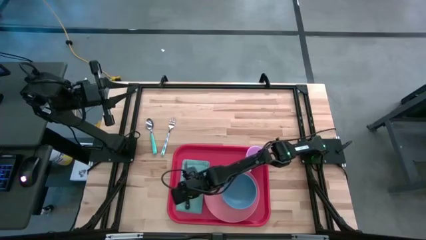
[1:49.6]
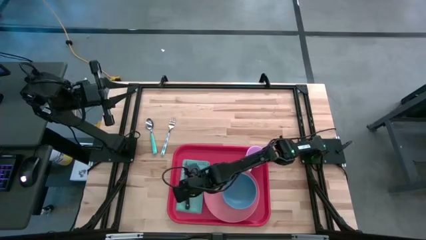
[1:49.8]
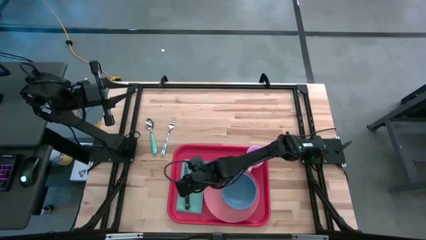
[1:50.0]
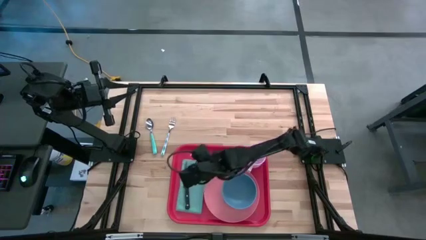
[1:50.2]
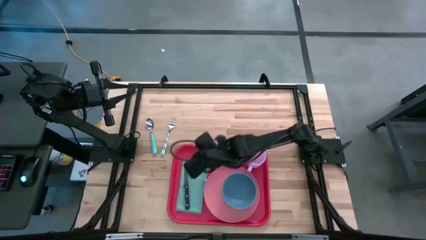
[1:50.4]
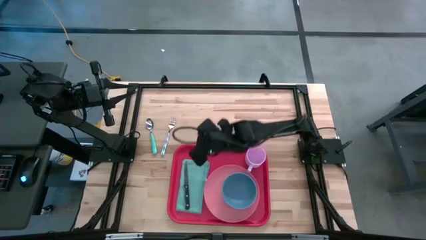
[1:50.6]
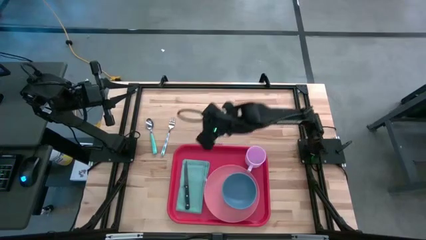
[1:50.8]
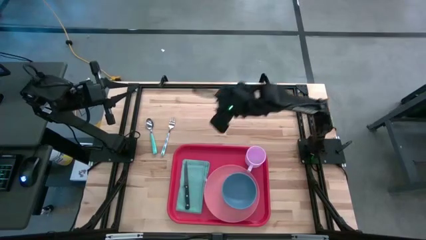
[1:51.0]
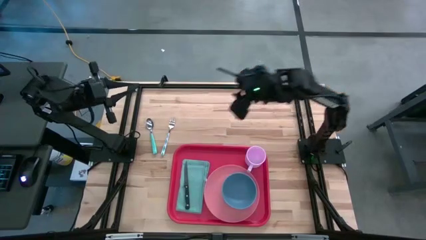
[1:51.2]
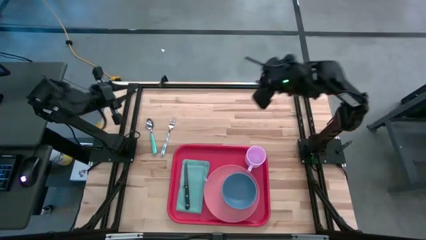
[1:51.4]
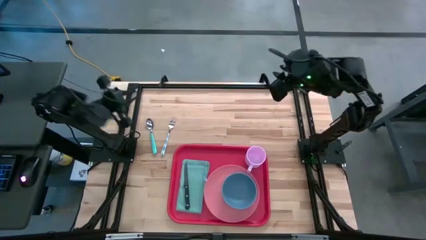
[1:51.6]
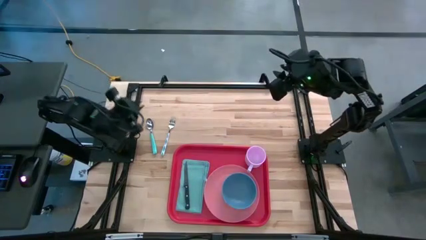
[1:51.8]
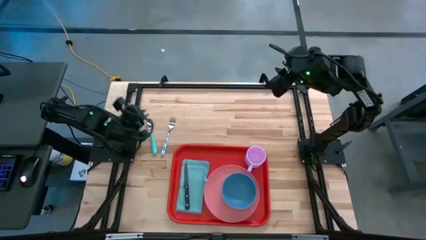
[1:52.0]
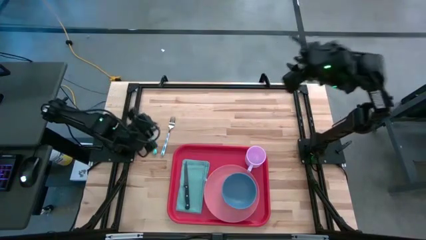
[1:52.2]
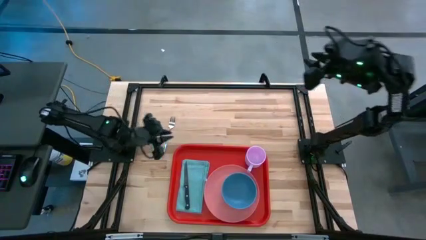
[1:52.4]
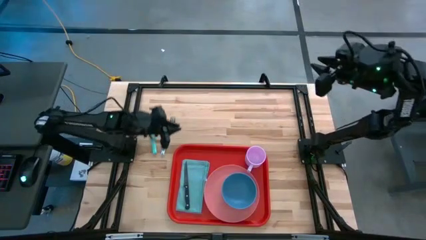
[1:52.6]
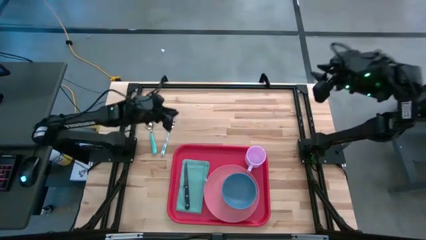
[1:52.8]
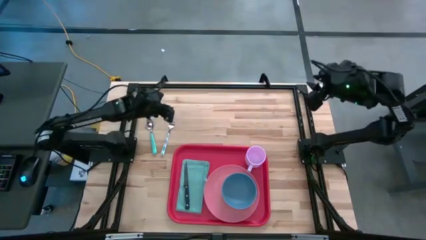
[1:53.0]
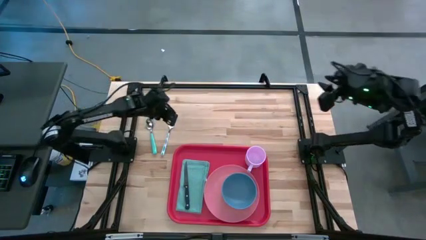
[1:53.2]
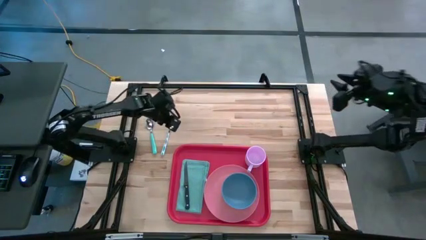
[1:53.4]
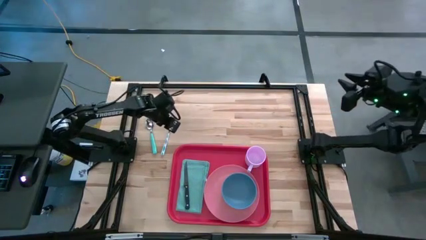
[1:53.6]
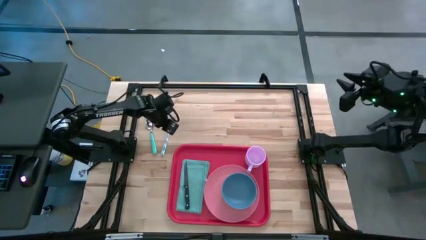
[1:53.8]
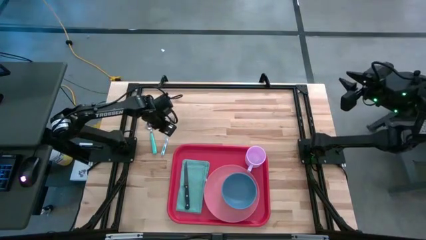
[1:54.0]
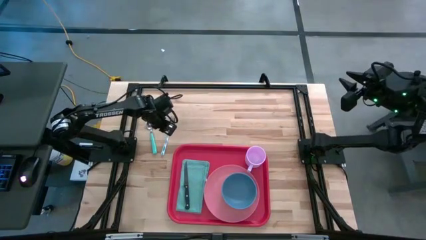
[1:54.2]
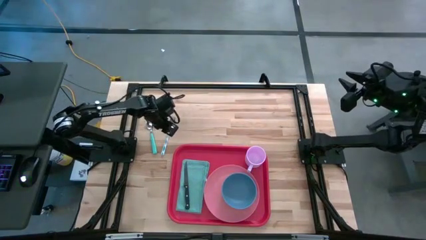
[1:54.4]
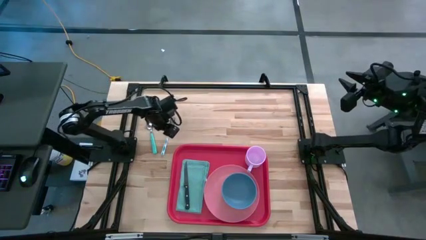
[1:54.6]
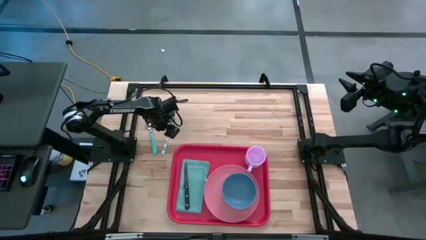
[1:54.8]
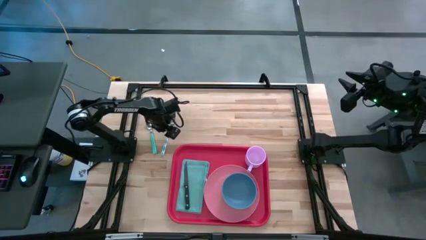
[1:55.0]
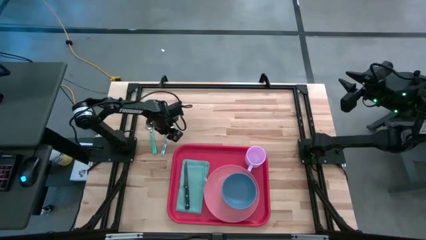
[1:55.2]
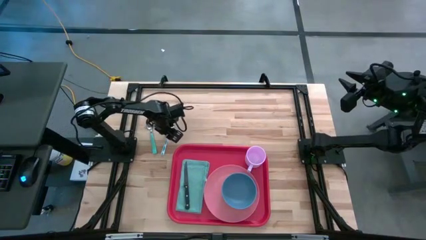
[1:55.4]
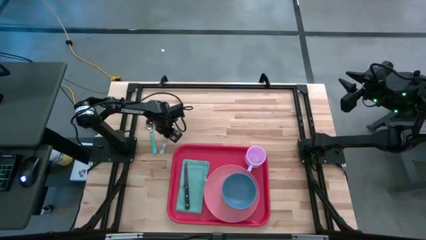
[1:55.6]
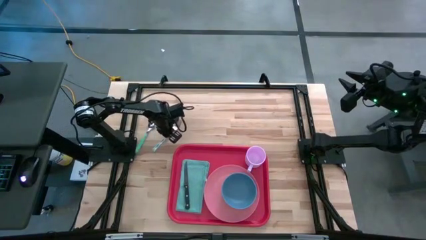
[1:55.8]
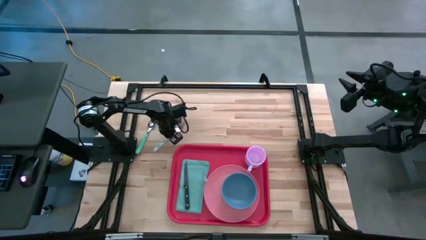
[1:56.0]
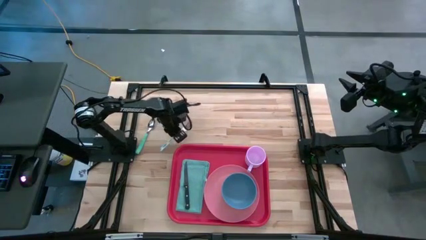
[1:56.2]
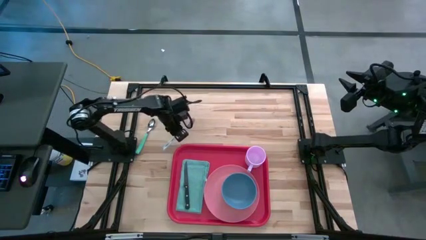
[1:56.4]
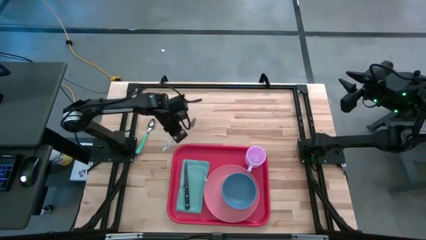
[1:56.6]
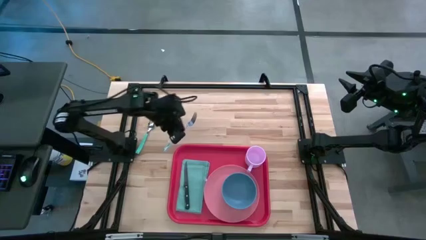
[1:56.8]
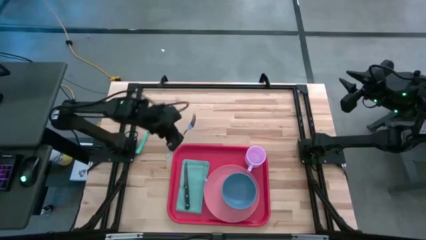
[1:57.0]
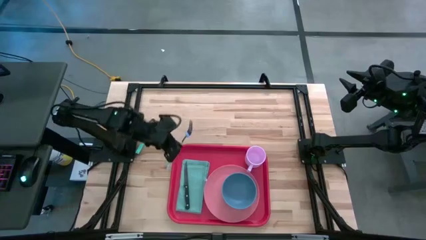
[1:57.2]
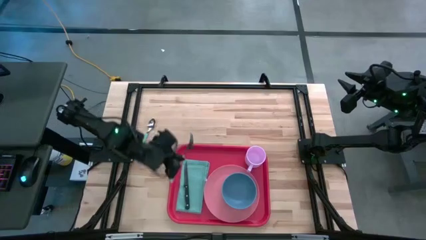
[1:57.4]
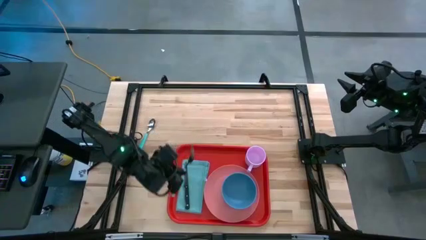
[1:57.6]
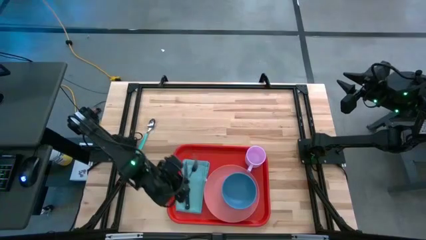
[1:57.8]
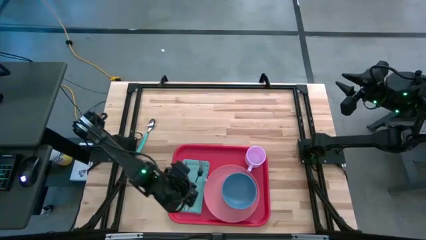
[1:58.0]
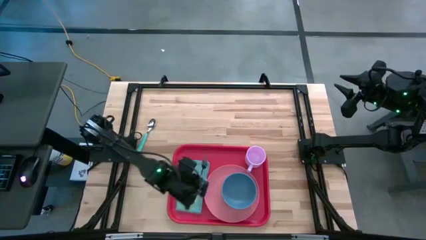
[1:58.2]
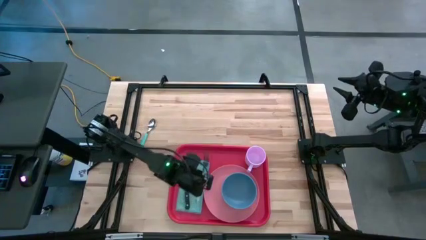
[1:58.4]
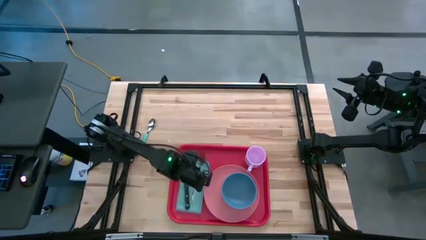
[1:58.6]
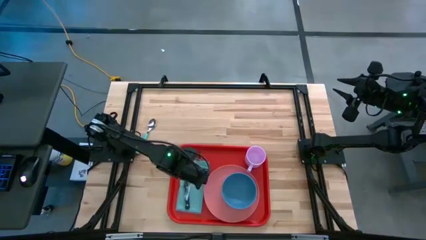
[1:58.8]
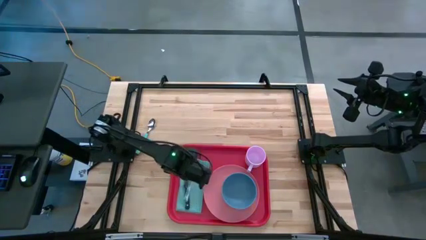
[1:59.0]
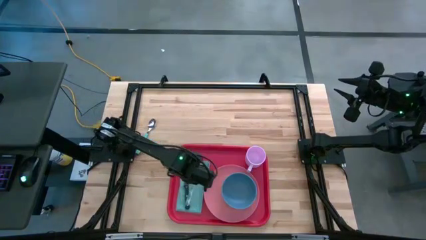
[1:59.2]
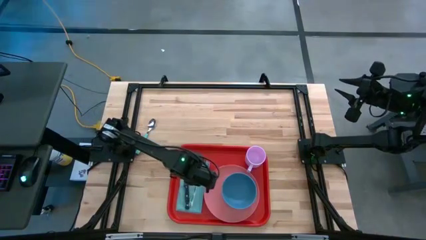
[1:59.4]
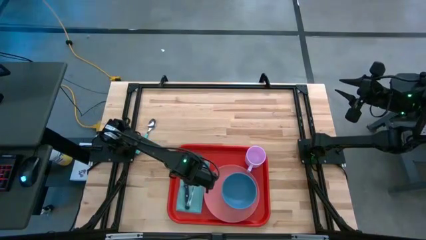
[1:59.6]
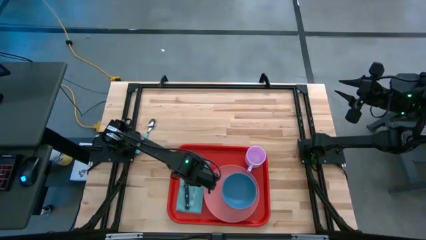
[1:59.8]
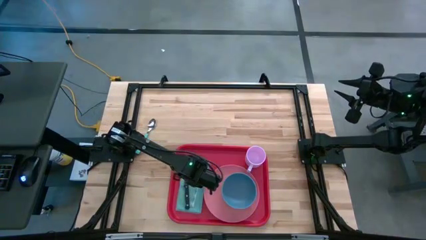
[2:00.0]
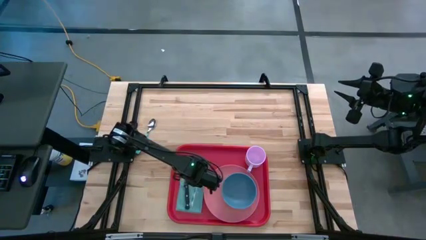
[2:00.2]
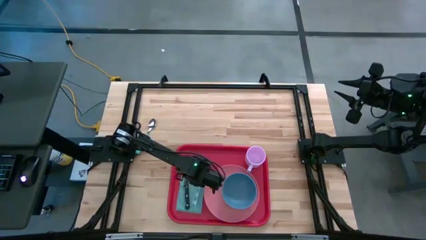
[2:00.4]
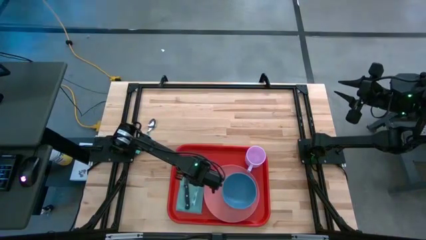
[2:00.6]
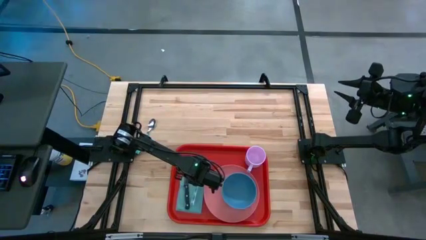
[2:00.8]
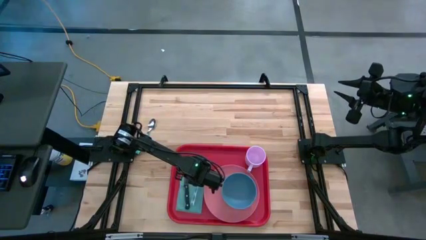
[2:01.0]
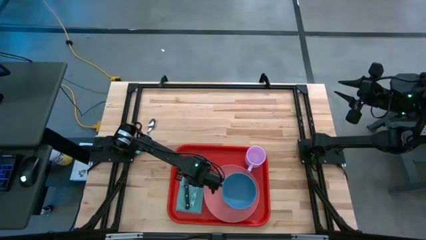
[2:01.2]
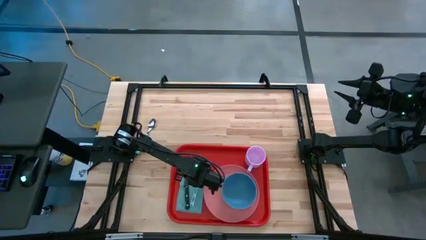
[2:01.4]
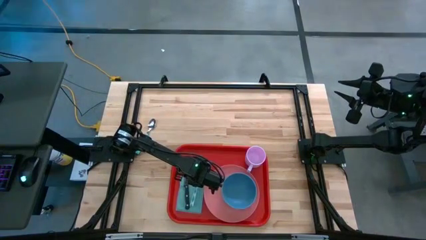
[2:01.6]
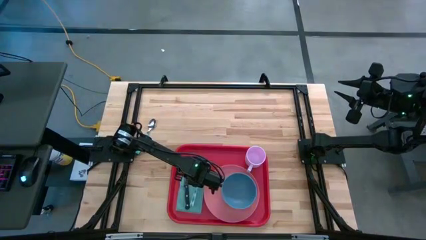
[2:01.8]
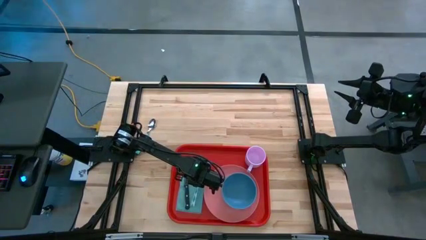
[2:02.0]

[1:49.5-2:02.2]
Task: Set up tray
Put the blue fork on top of the blue napkin to the right of the knife

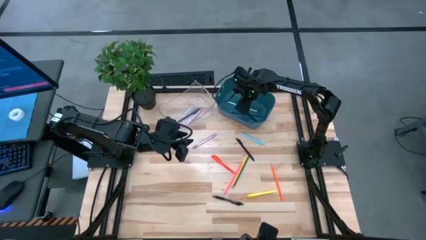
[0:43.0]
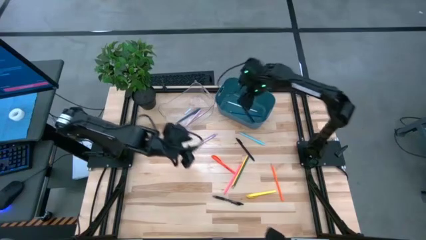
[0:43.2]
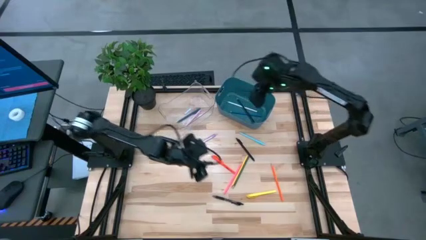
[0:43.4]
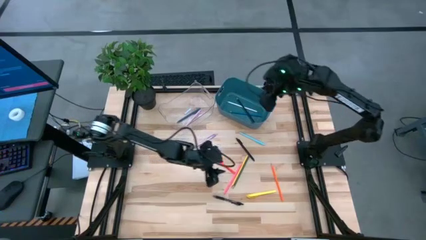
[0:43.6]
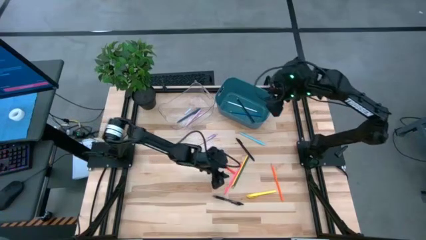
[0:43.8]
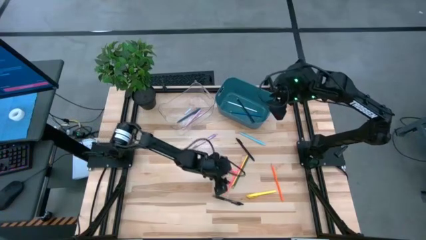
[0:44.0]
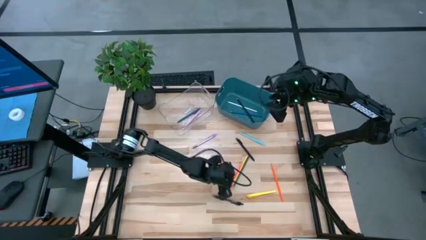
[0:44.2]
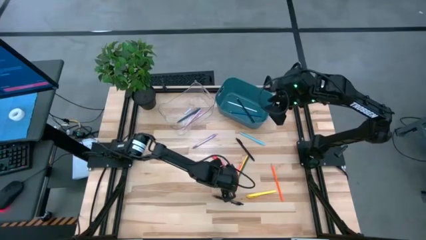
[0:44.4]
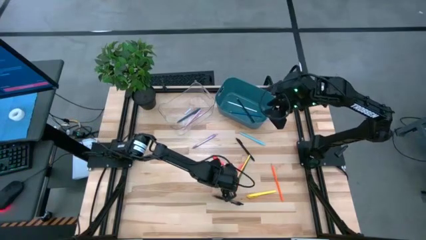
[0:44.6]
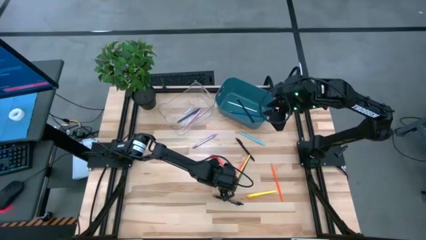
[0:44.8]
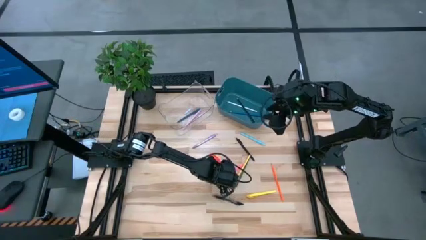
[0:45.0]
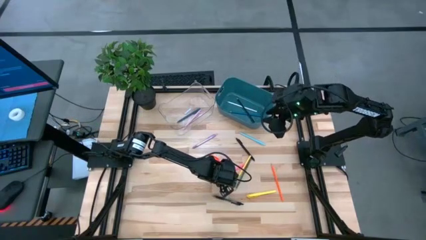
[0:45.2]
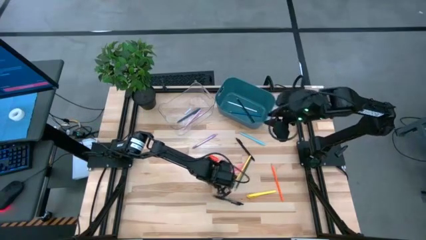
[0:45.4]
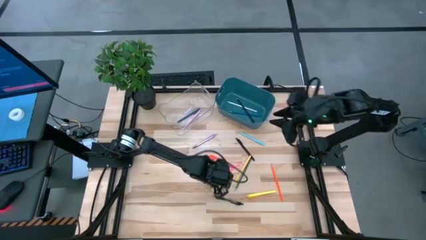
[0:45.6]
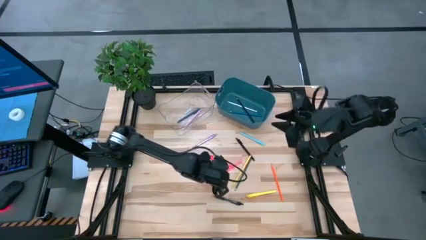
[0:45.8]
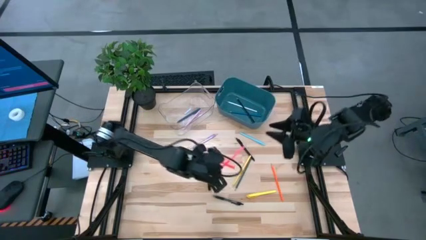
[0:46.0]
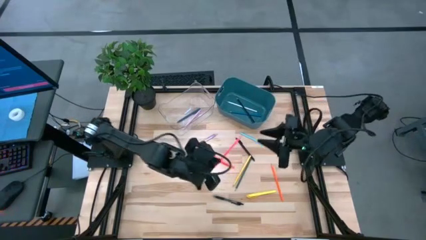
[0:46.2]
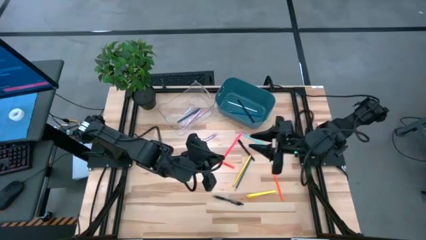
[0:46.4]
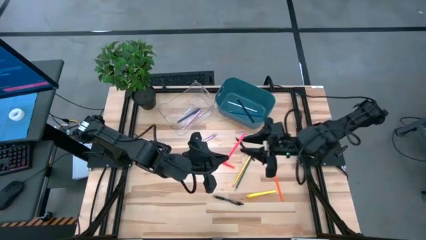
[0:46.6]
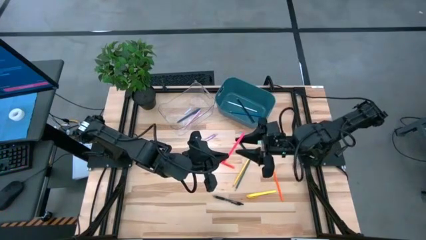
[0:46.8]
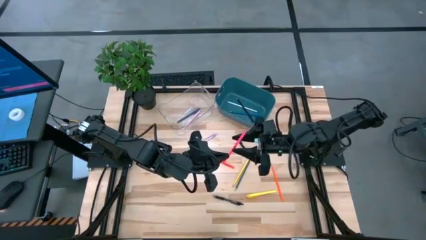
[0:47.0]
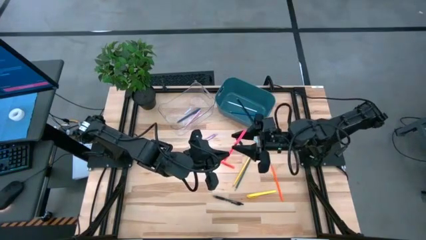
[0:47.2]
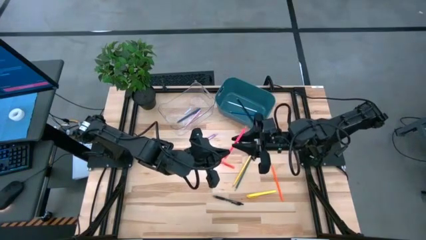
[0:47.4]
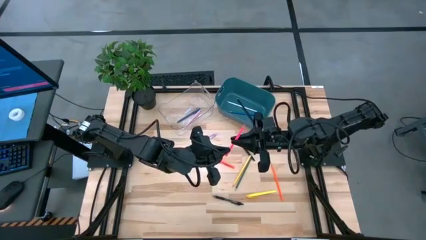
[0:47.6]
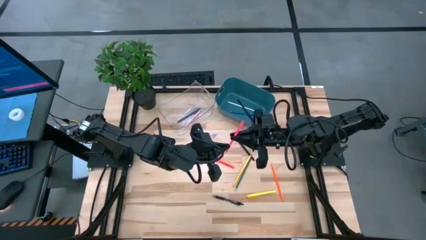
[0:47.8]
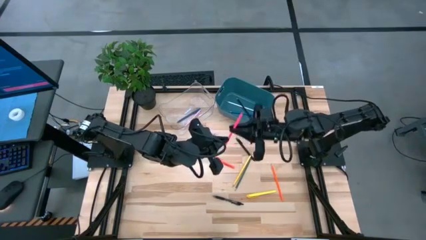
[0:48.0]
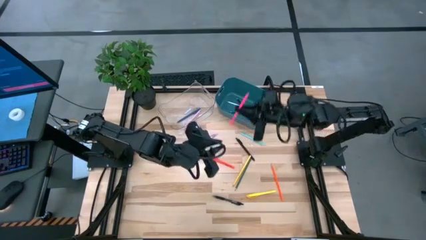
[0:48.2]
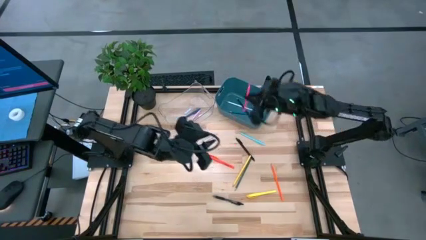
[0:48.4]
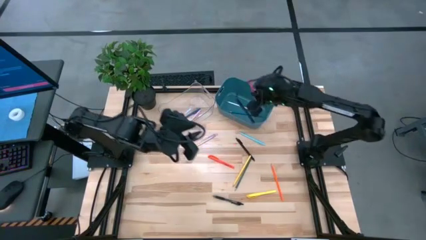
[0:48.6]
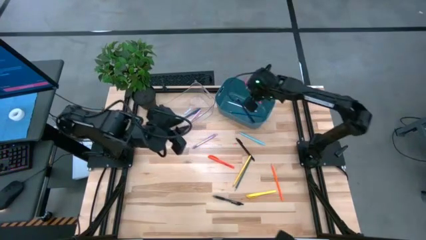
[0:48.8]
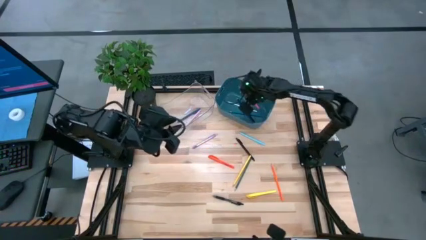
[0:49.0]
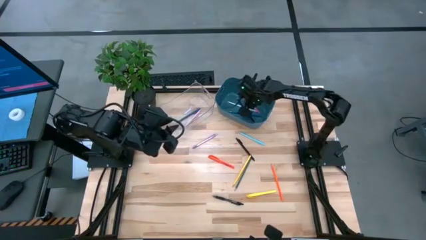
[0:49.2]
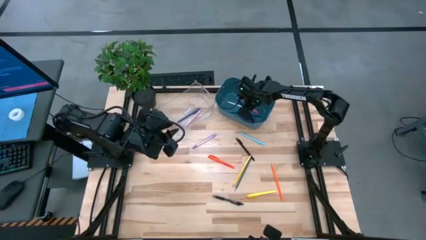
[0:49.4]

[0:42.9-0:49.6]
Task: Sort pens & pencils
Put the pink colored pencil into the blue bin
